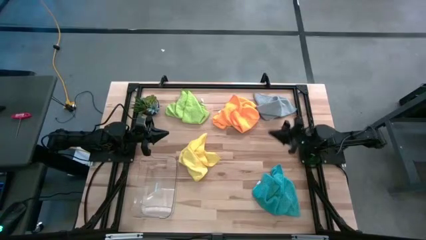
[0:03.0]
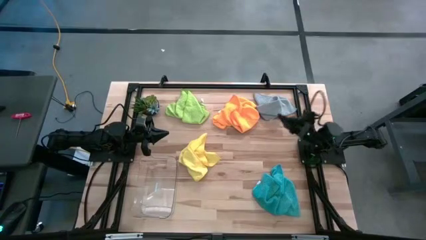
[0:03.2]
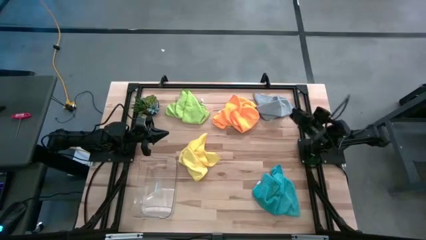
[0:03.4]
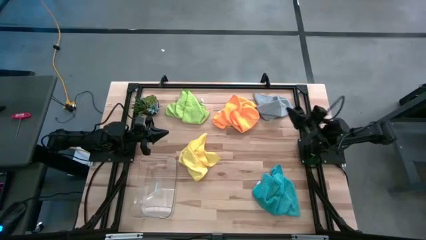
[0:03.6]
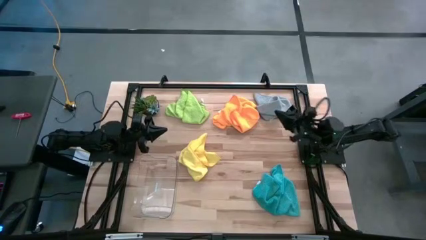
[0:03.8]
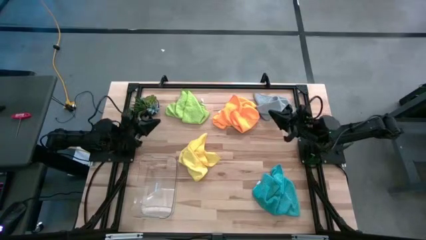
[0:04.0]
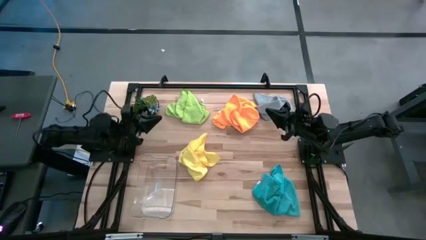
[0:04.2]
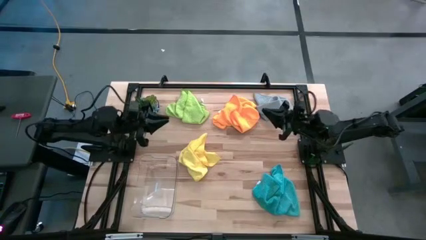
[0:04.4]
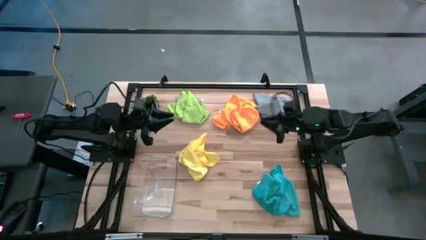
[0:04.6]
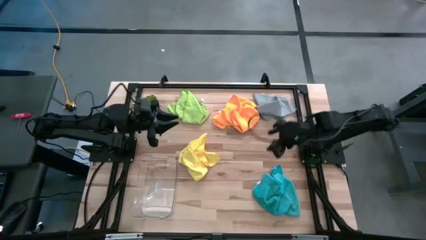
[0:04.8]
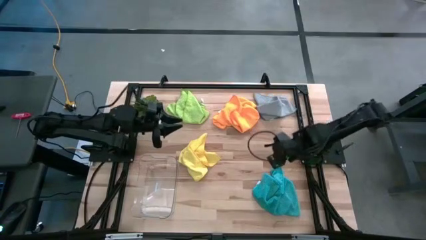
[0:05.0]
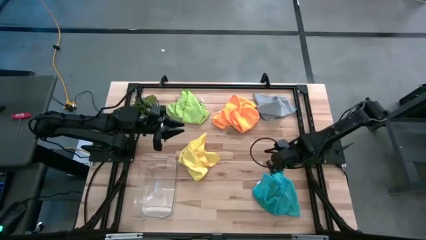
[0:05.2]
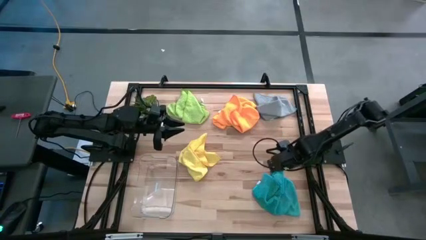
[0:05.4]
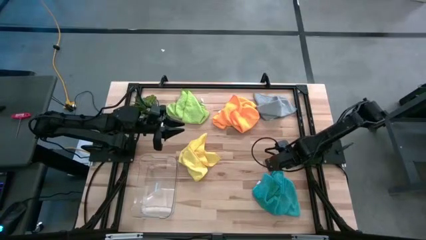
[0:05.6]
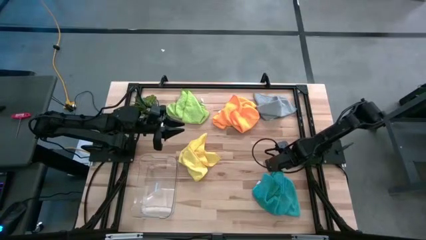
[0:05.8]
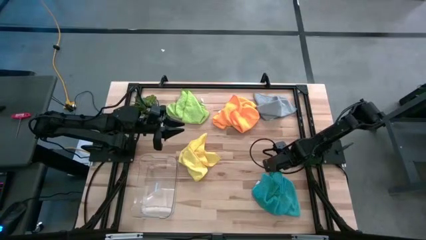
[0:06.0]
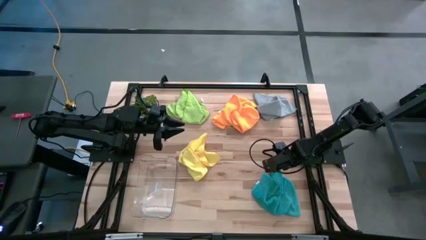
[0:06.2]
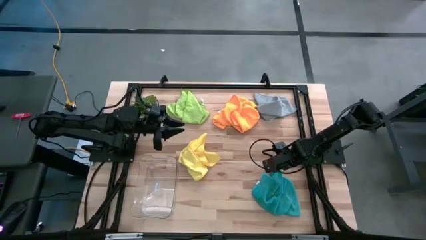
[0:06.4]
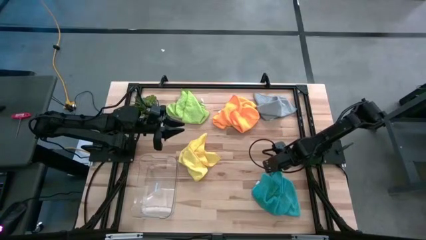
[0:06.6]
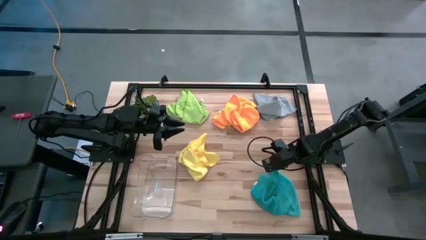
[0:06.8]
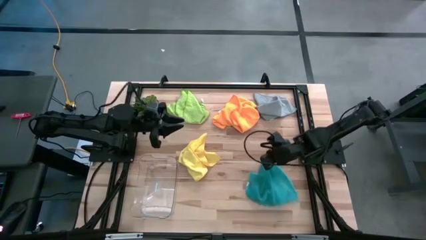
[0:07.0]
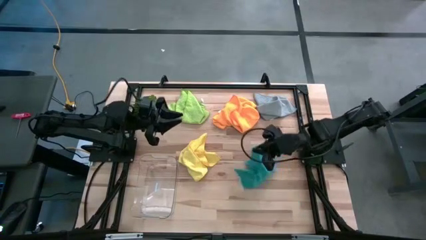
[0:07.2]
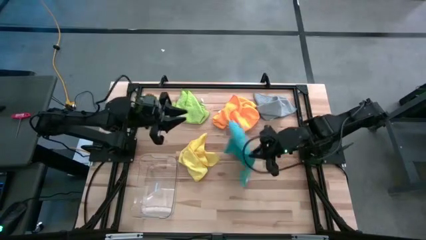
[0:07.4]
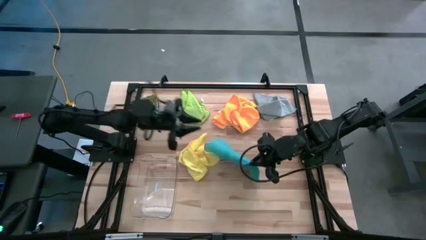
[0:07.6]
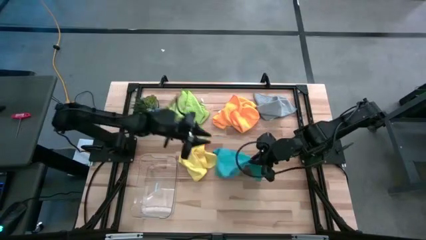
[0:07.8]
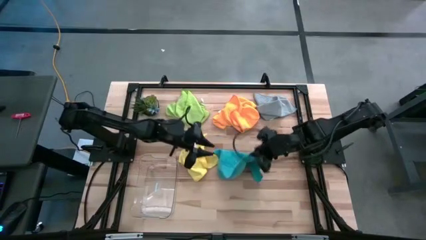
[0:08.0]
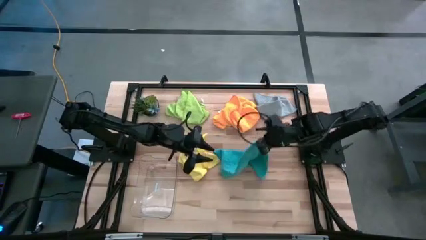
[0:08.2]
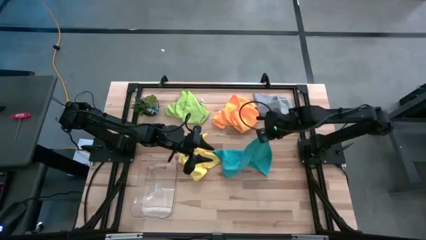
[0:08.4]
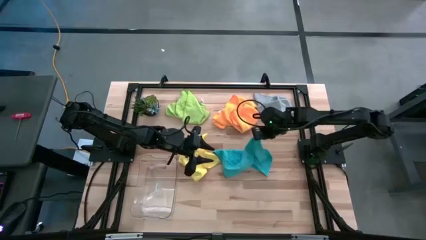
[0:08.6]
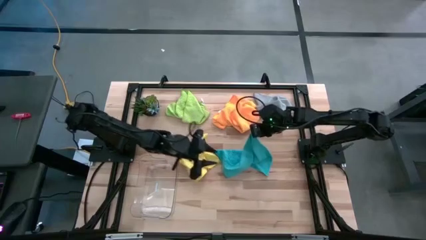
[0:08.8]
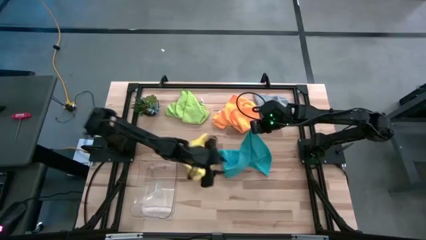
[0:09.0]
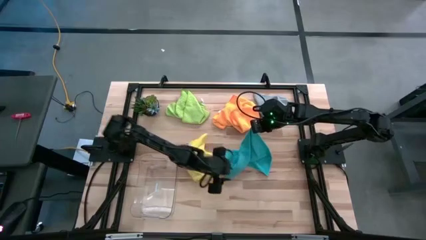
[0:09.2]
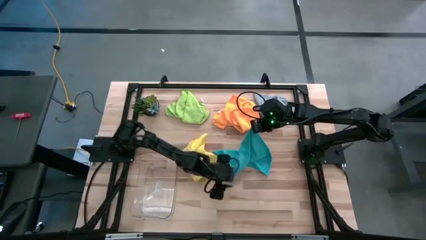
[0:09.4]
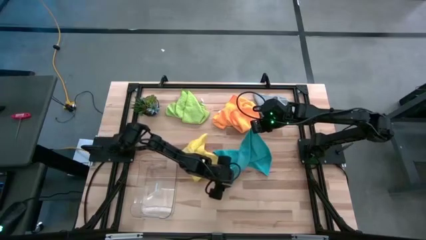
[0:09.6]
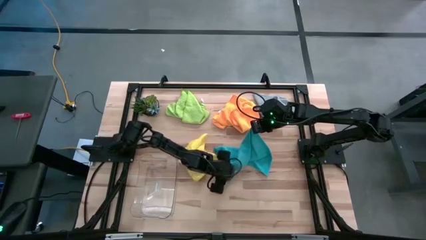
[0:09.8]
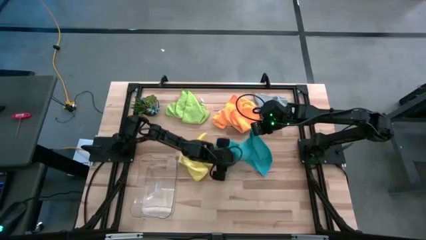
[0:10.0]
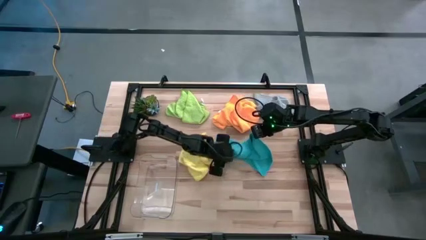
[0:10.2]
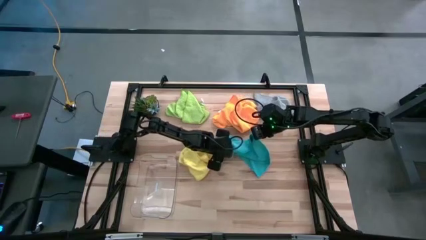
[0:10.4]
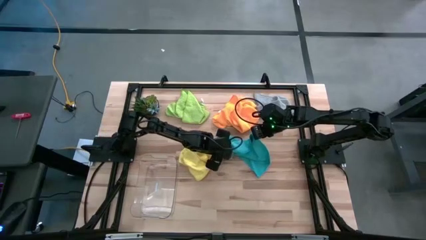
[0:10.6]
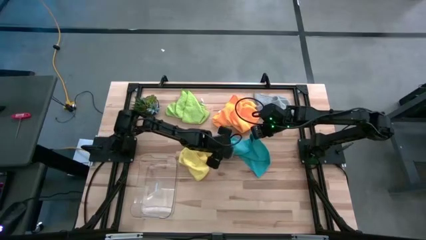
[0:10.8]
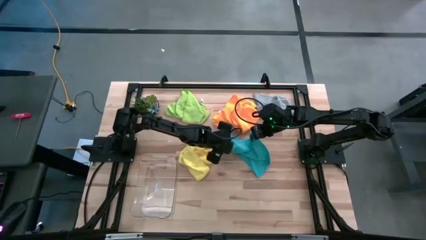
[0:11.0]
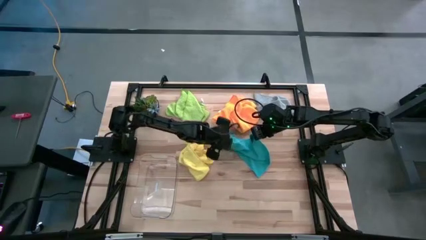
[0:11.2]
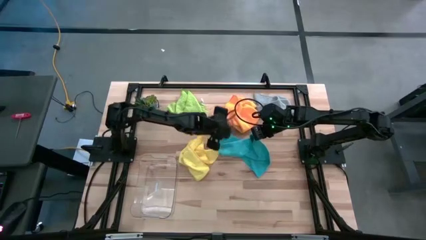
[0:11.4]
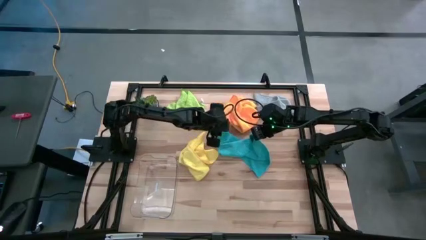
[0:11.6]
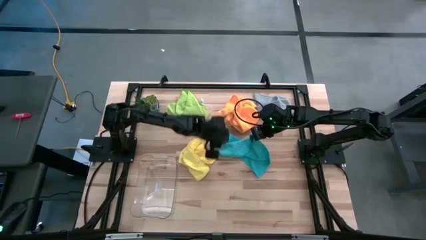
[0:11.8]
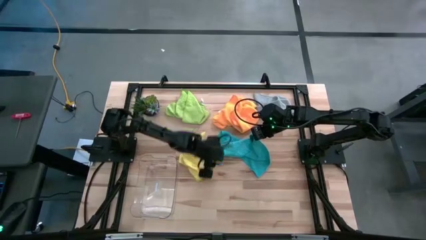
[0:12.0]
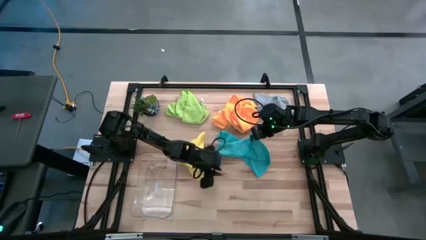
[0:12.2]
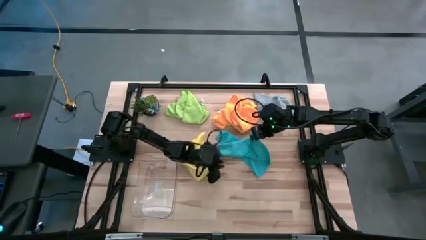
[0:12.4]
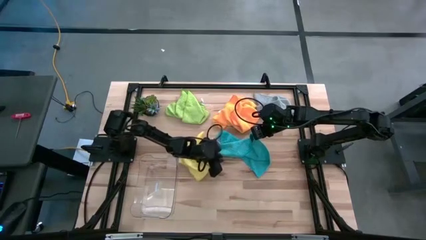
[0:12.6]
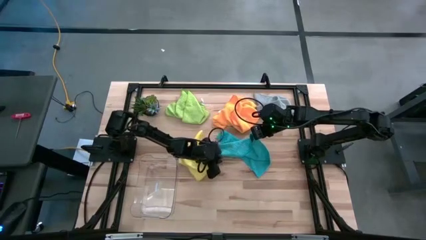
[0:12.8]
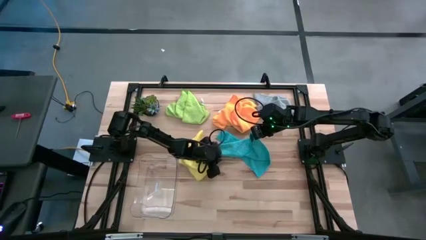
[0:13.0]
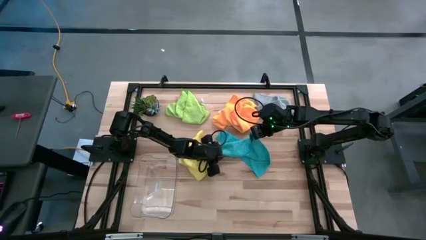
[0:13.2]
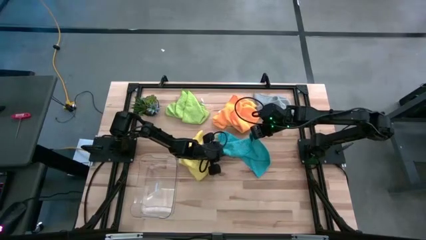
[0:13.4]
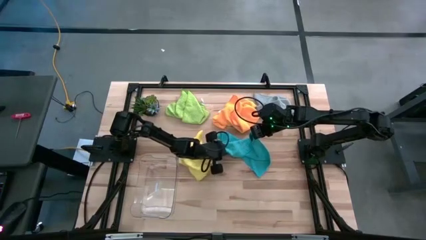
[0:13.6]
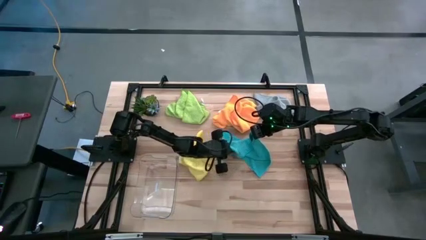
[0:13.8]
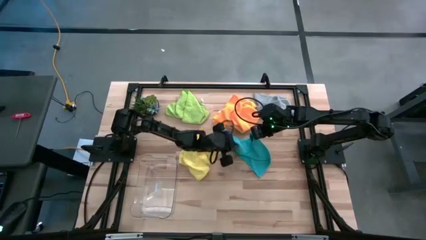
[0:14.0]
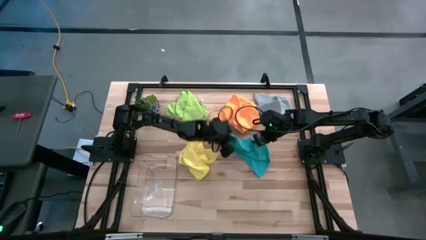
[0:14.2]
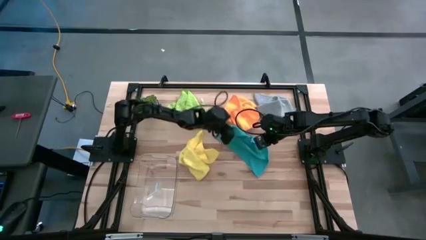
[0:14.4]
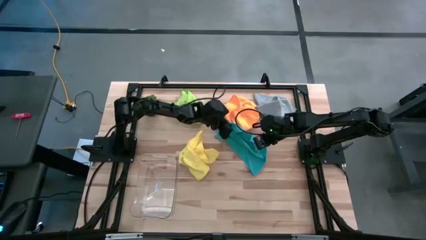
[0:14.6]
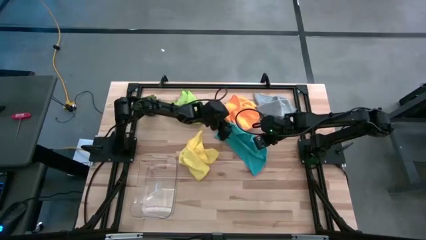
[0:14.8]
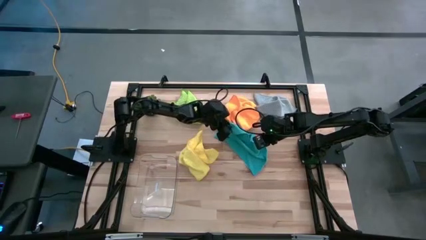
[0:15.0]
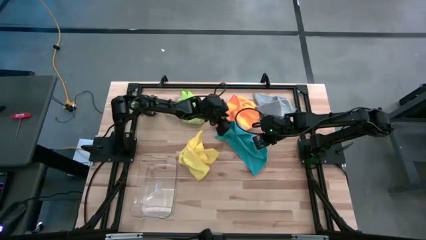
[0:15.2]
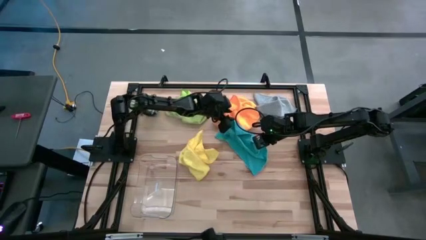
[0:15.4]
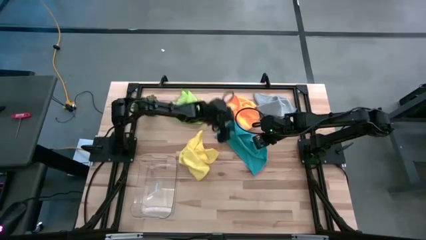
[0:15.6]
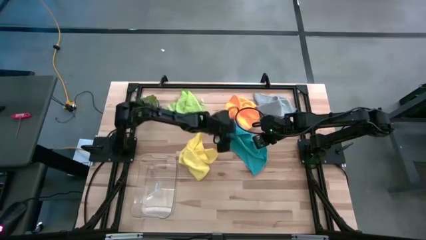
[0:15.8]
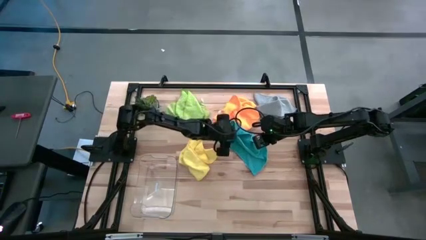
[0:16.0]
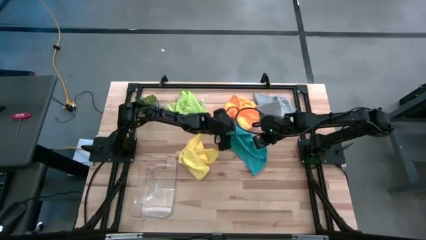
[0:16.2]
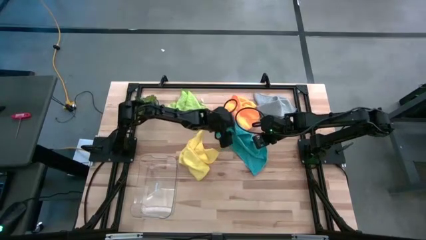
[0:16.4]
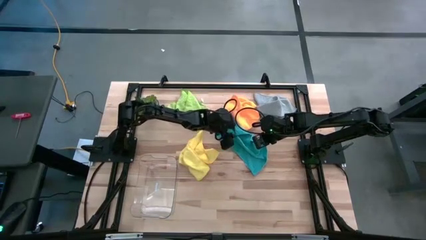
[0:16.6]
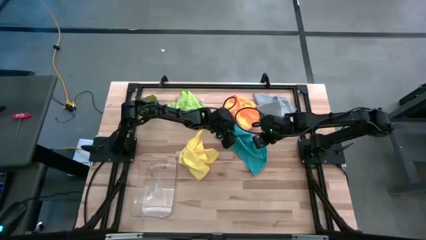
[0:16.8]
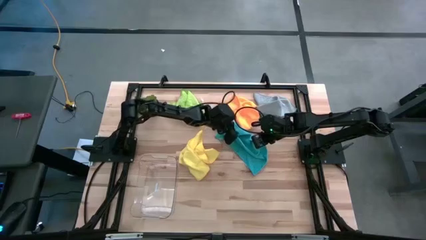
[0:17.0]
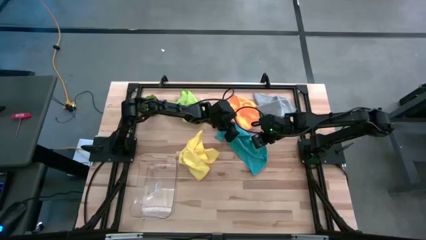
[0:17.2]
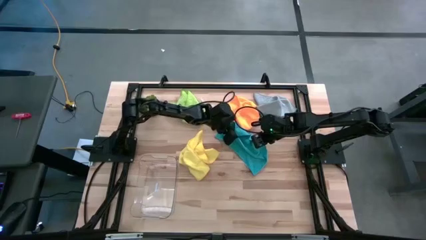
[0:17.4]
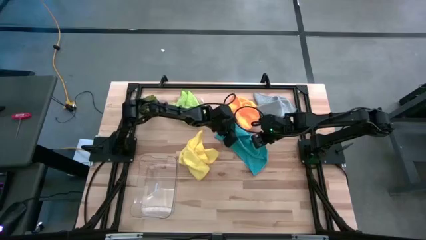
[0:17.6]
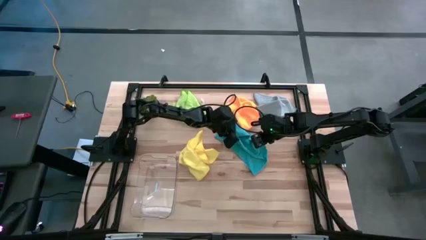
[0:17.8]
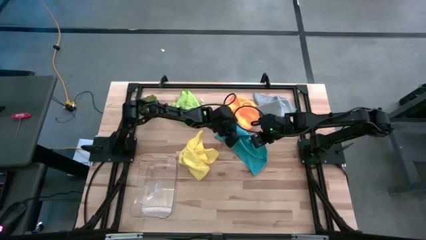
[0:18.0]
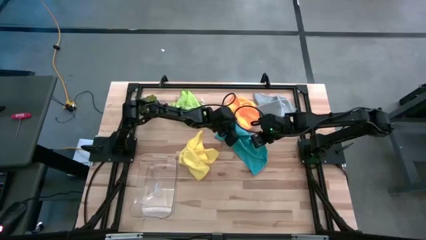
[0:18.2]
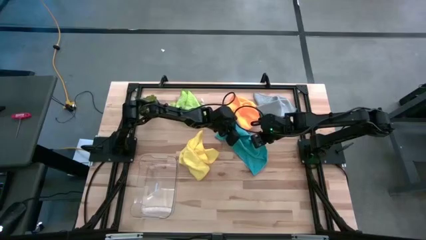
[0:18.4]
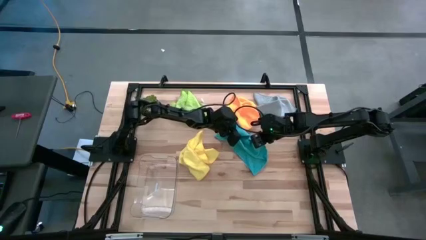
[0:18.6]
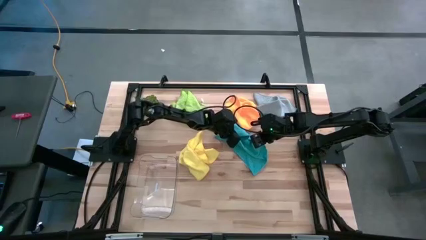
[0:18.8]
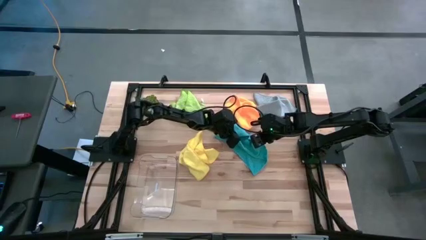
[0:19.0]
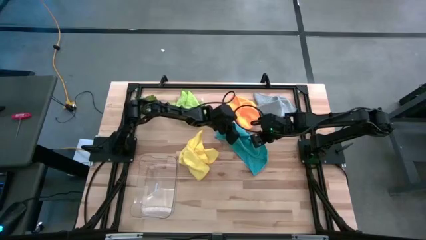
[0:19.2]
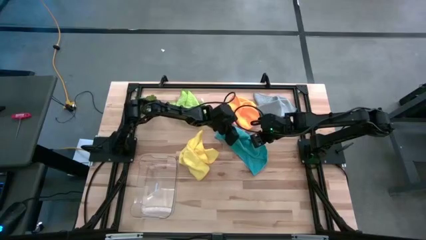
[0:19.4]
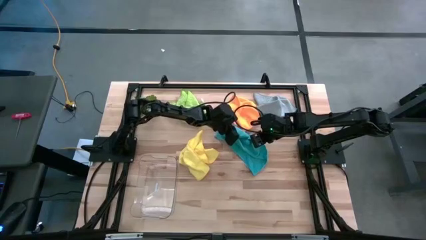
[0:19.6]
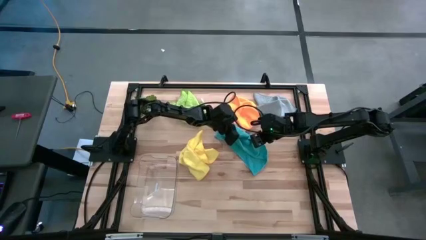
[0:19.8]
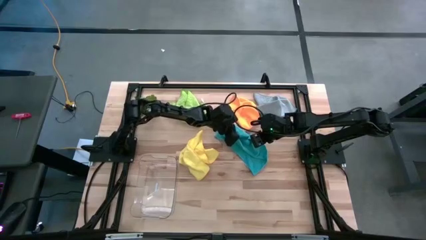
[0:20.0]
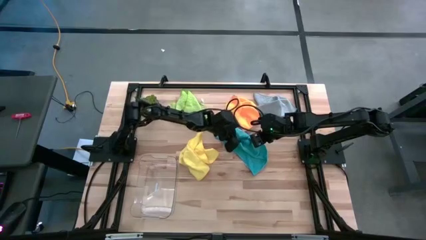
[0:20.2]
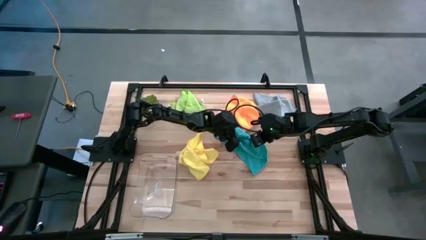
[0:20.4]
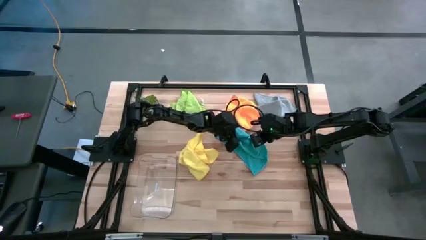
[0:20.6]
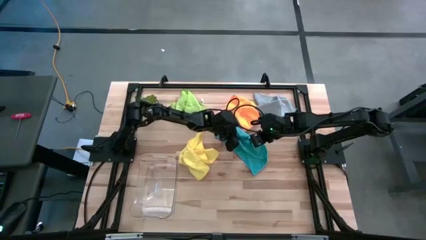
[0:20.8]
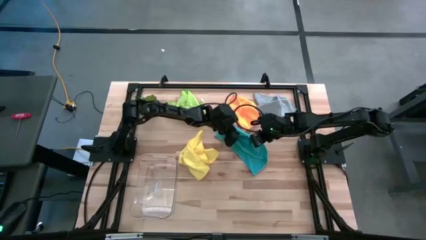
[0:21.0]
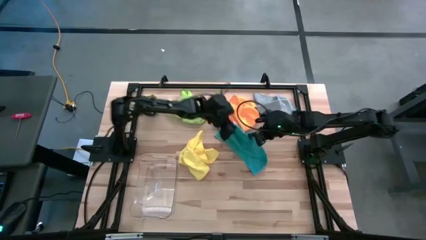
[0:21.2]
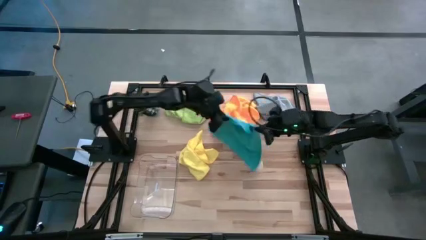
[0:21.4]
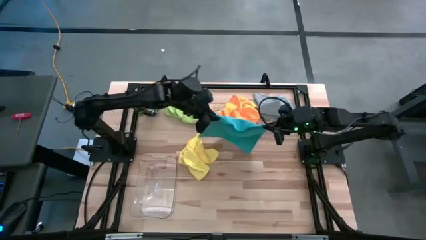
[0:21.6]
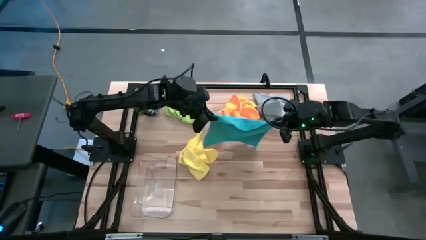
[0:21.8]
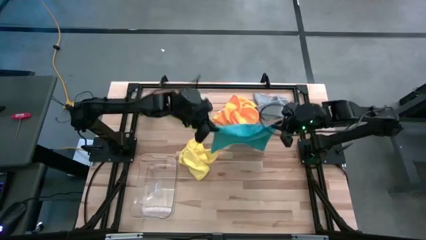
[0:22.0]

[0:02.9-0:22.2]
Task: Fold microfiber towels
Fold the blue towel
